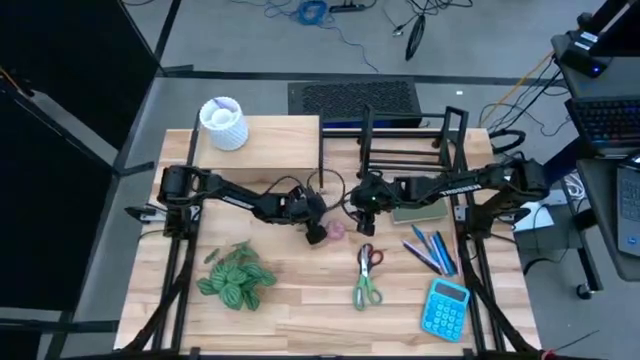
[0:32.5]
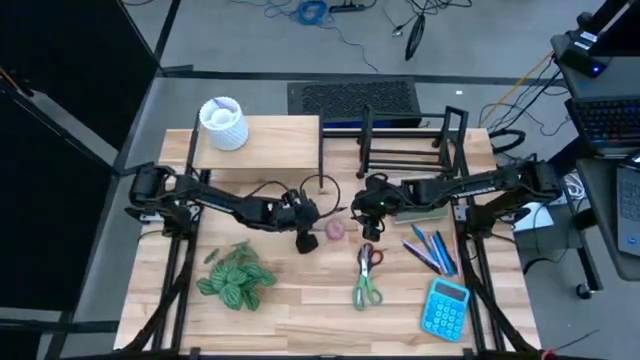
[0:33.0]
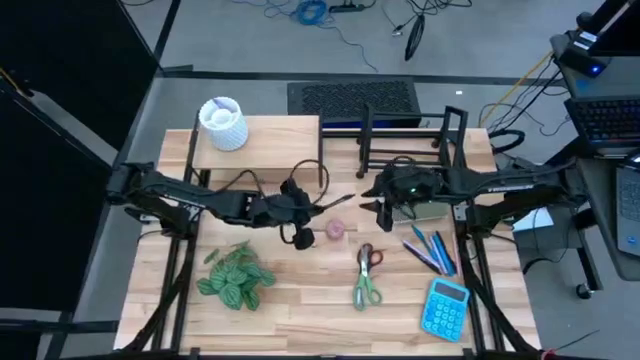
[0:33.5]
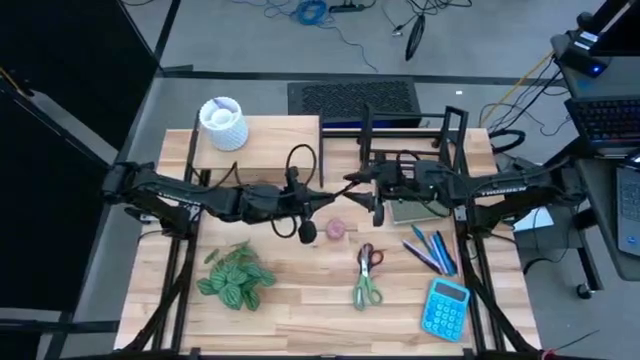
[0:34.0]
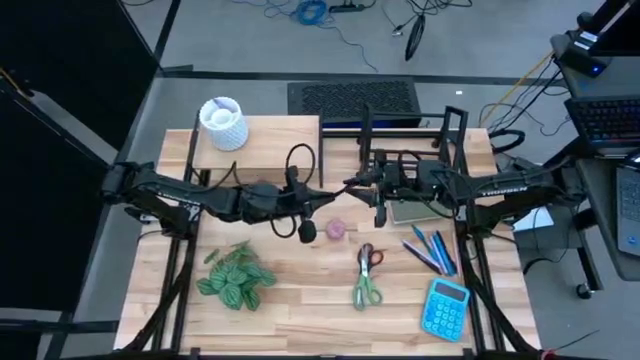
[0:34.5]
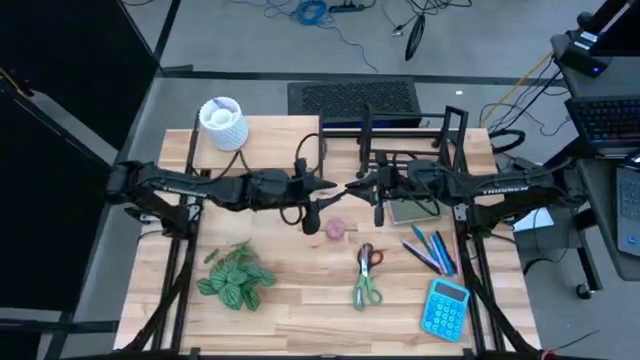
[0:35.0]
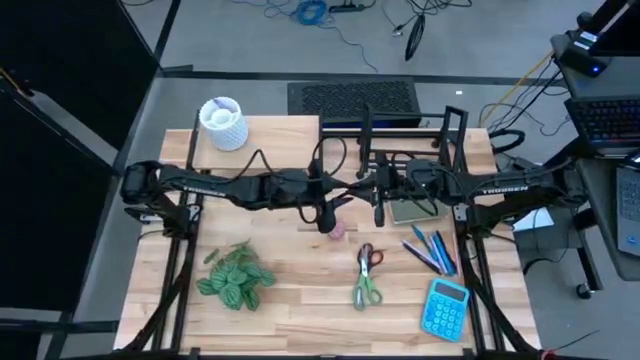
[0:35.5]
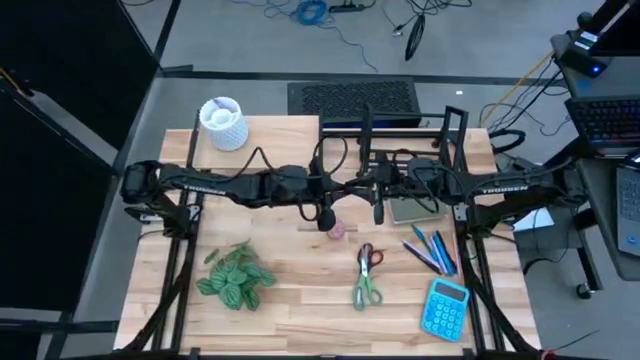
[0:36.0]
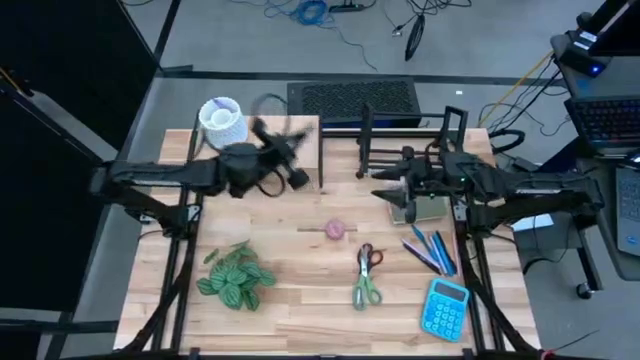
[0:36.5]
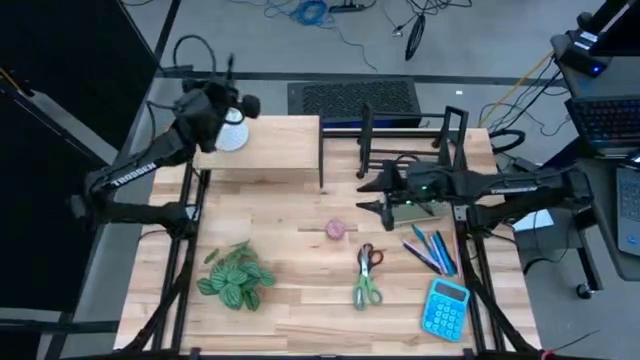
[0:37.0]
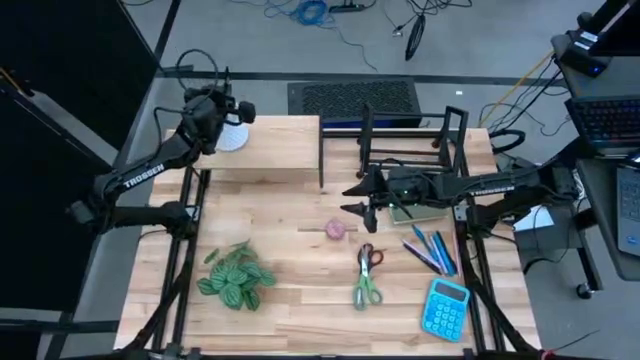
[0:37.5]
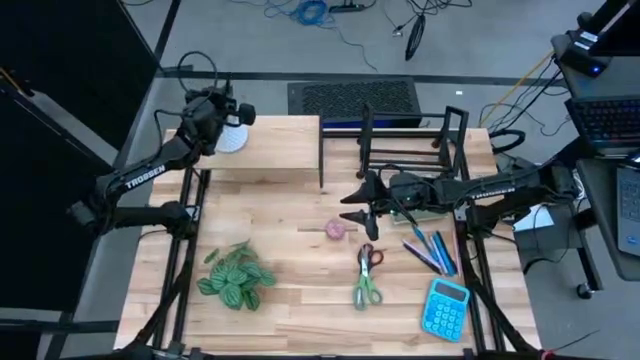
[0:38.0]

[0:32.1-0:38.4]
Task: Stock shelves
Put the black pen into the white pen holder

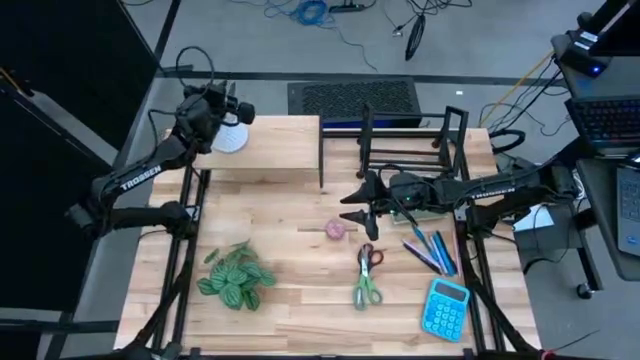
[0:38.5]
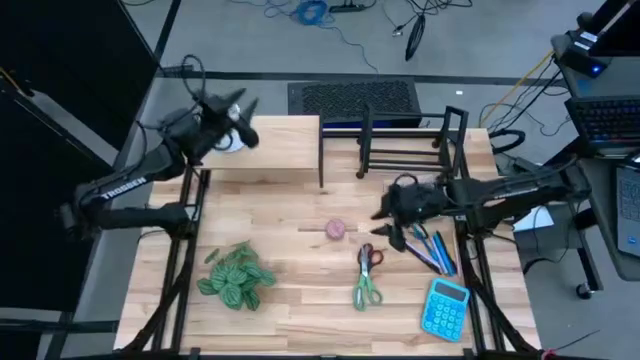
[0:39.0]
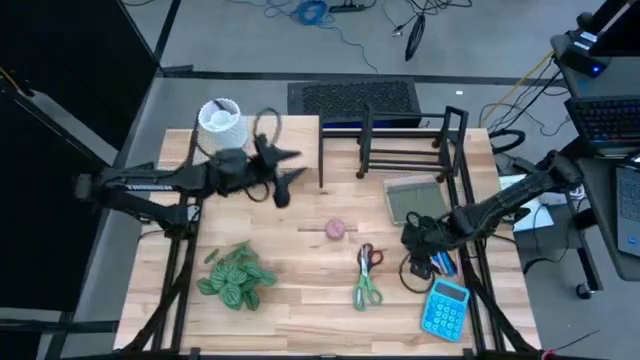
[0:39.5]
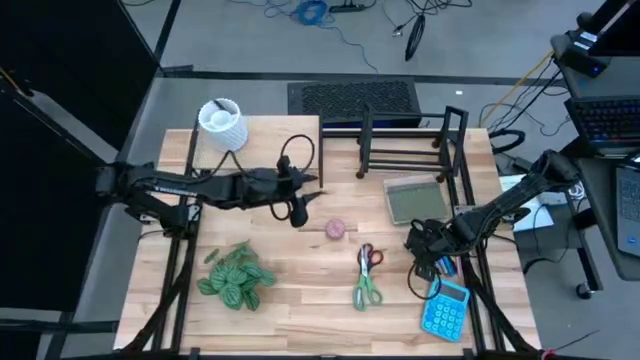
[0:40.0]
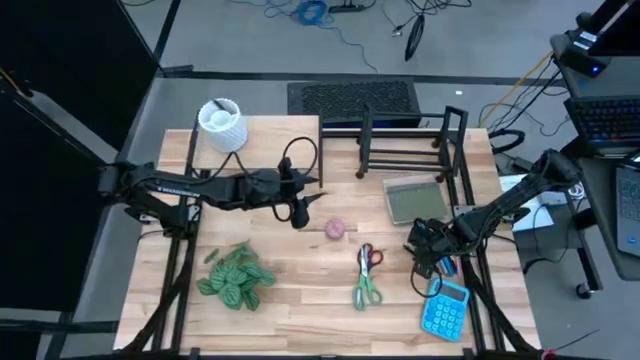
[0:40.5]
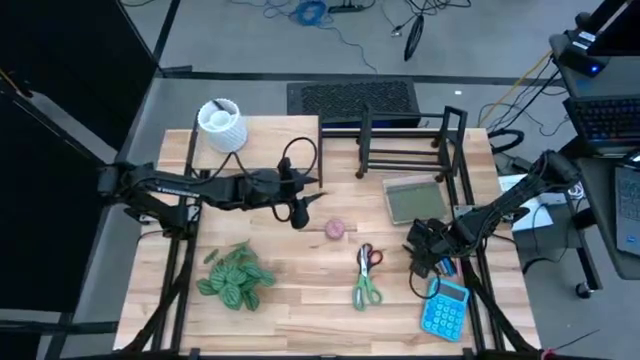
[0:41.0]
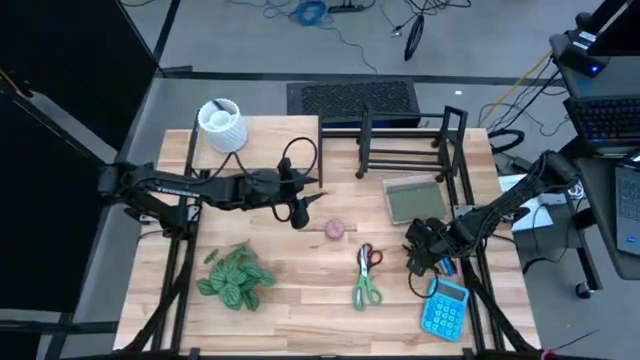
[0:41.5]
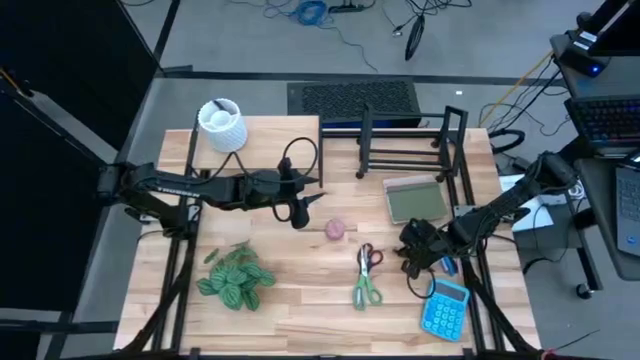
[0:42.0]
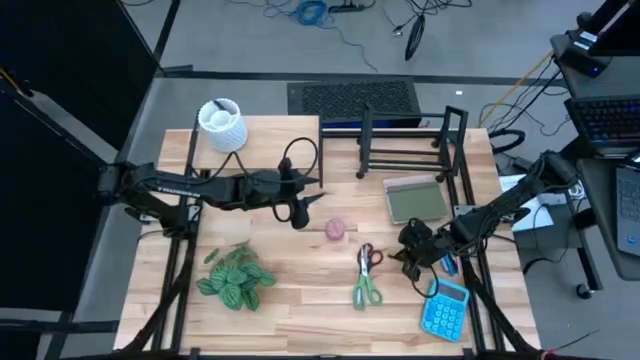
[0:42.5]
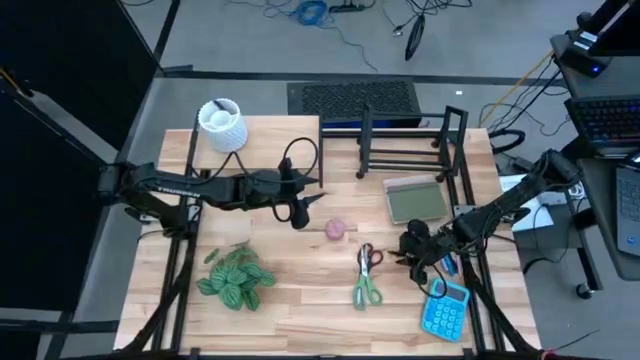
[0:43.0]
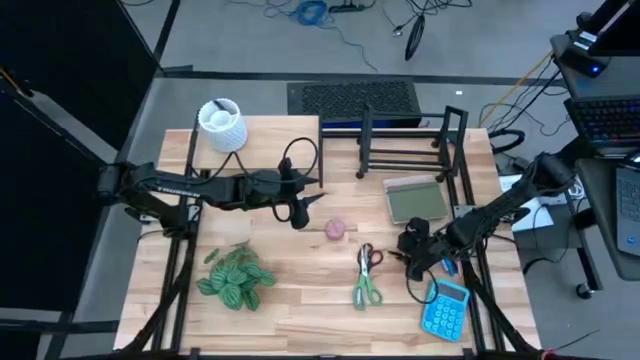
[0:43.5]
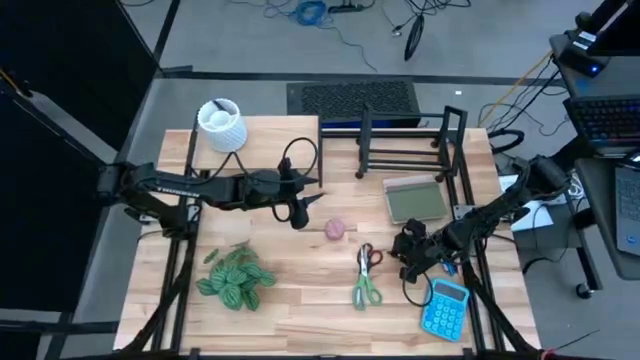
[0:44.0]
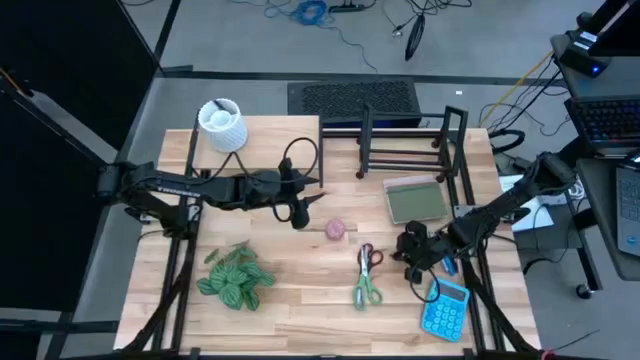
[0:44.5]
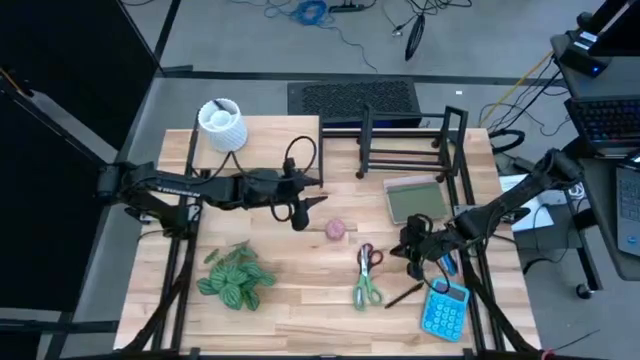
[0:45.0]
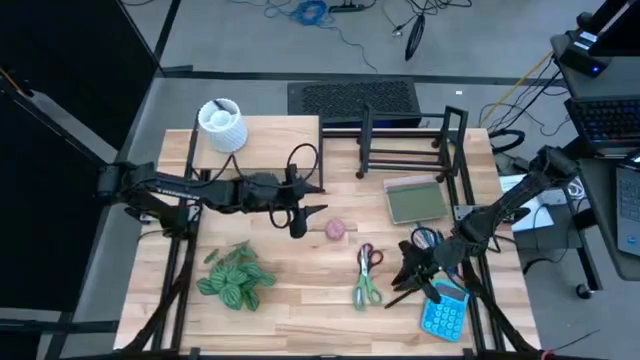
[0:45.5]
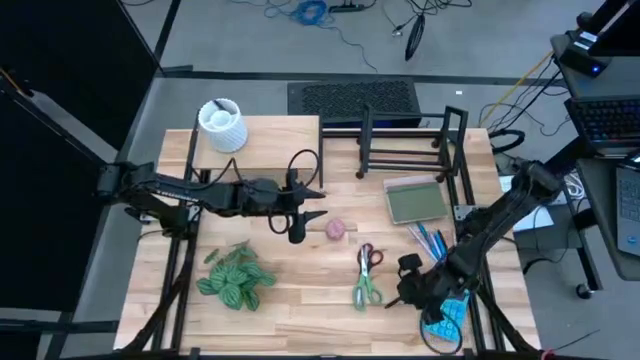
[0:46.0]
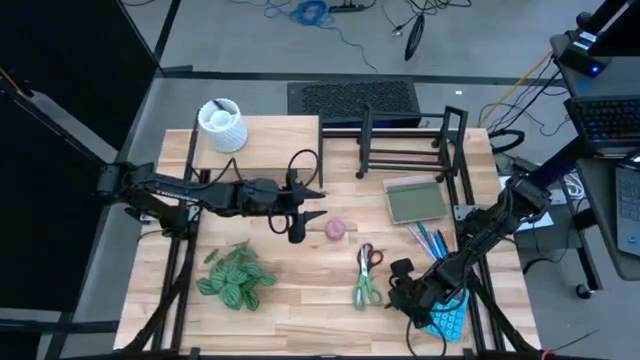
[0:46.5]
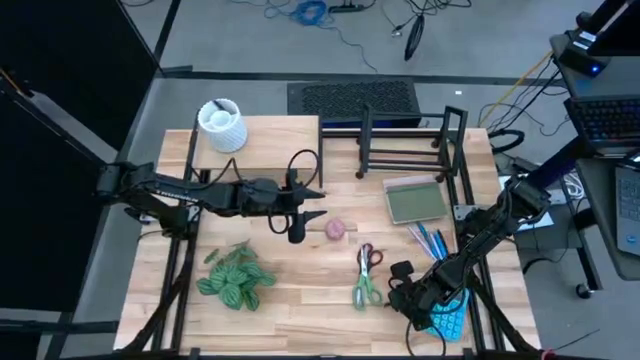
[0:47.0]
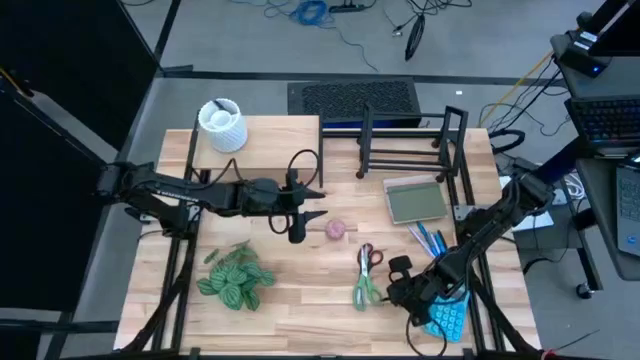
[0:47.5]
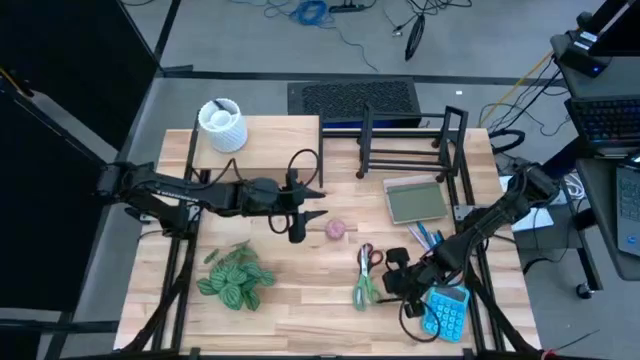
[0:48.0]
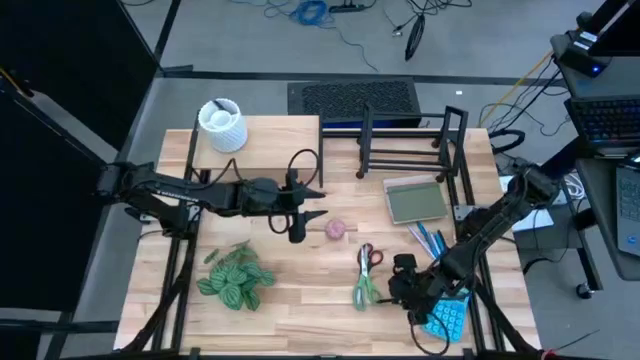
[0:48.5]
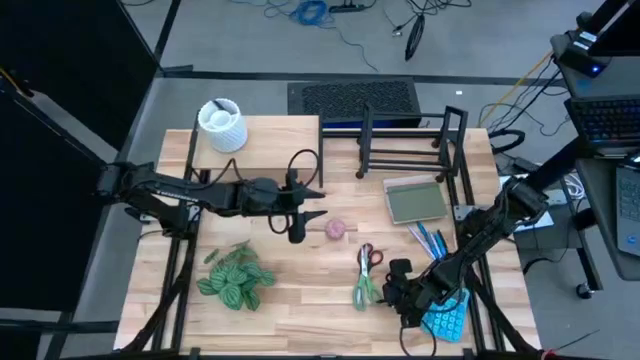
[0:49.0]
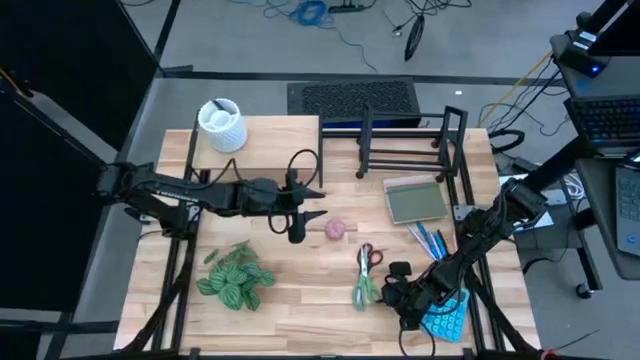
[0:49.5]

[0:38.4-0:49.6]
Put the black pen into the white pen holder

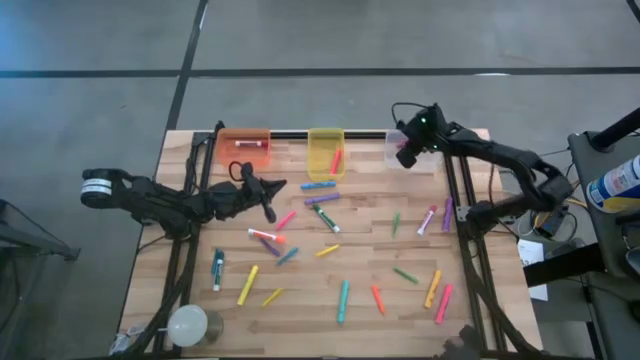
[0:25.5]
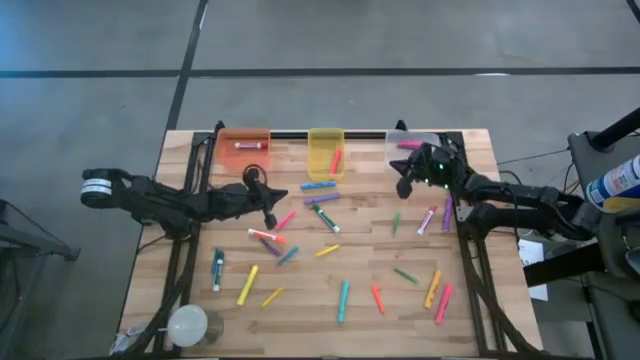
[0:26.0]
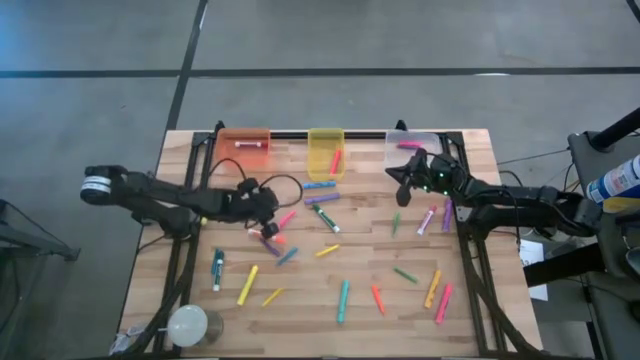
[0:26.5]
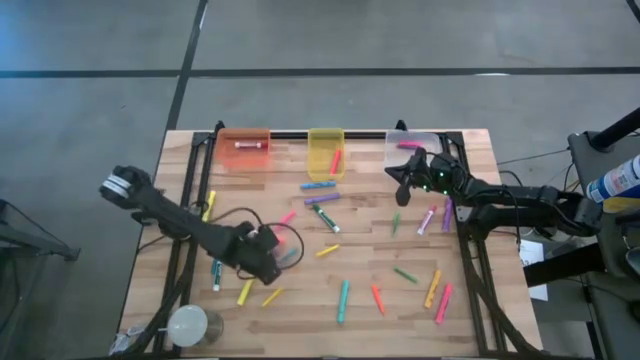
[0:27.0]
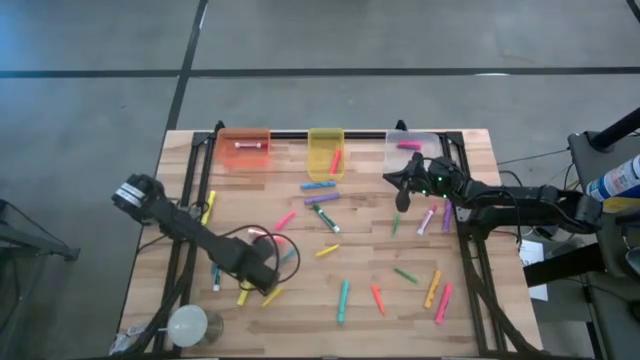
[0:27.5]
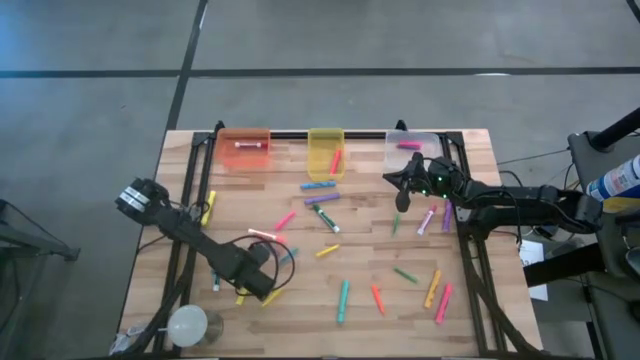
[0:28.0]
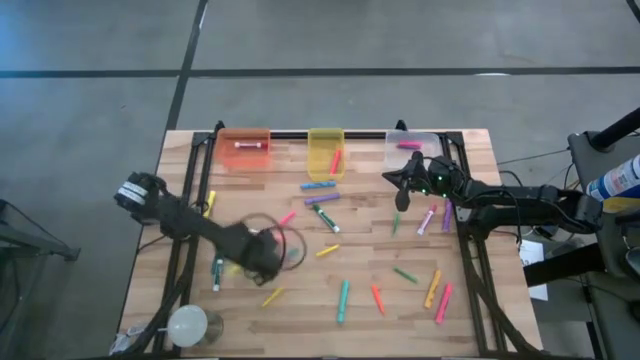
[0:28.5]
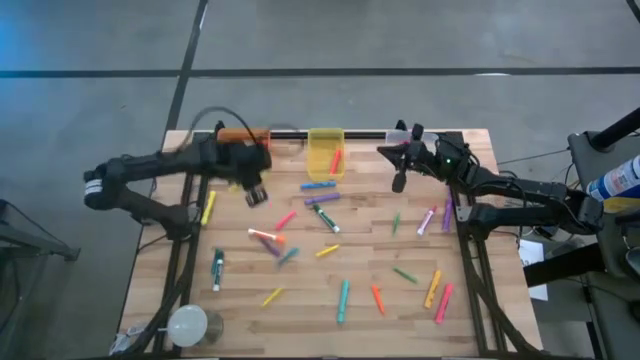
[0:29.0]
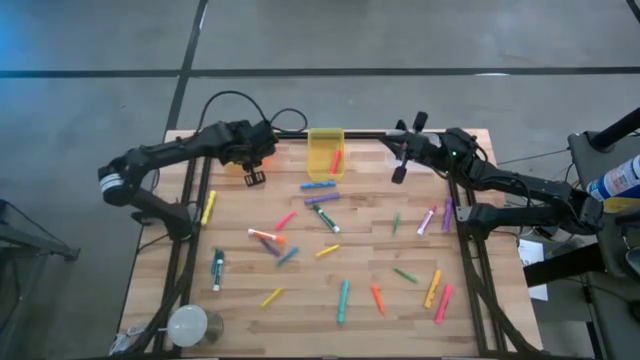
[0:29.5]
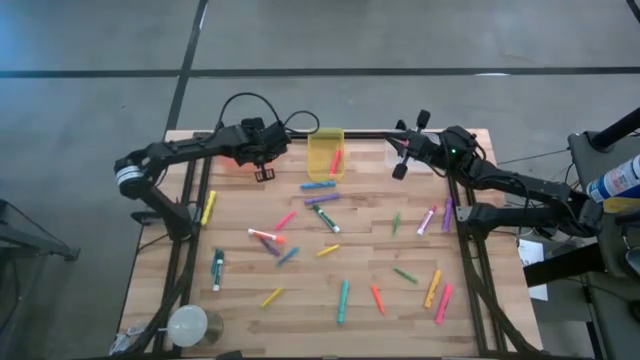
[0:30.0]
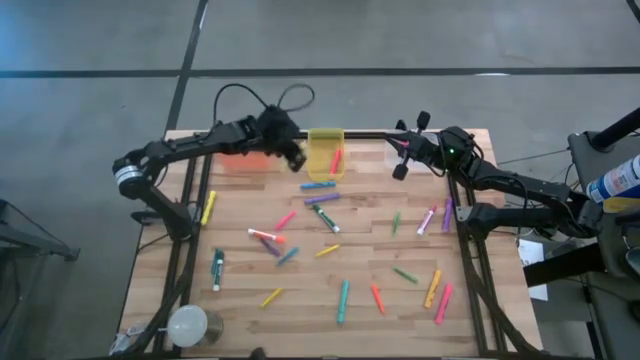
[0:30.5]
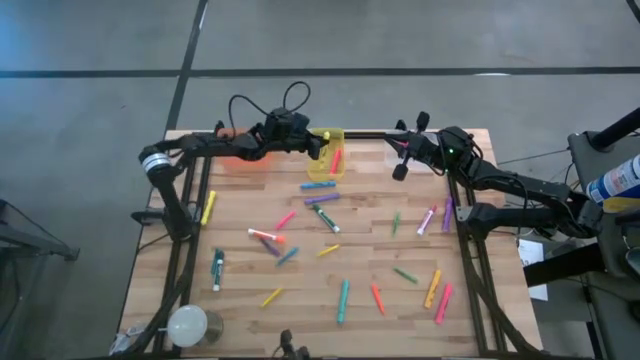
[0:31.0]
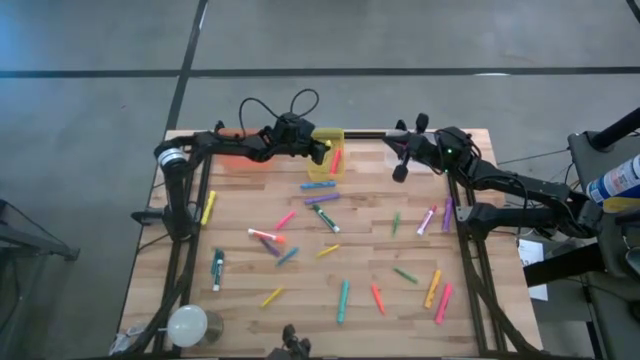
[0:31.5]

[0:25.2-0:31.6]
Task: Pick & Place Markers
Put the bottom yellow highlighter pen into the yellow bin
